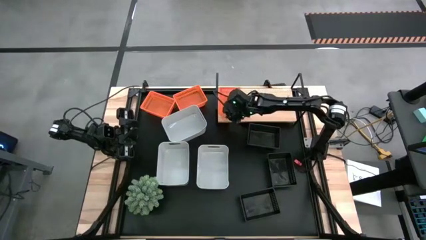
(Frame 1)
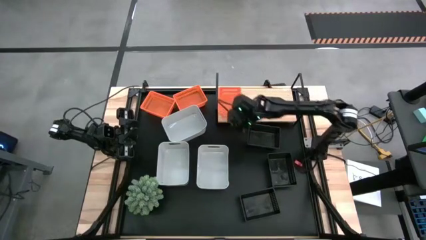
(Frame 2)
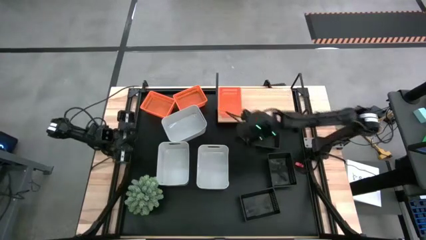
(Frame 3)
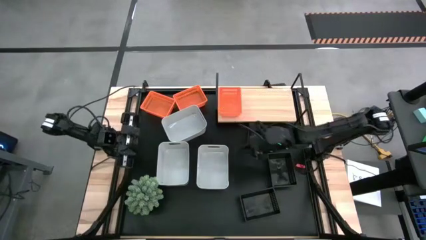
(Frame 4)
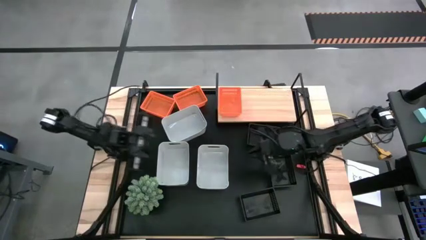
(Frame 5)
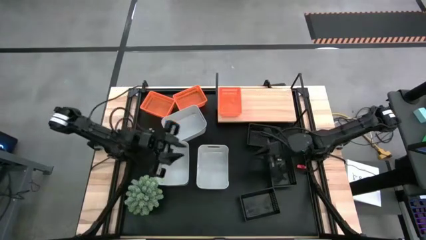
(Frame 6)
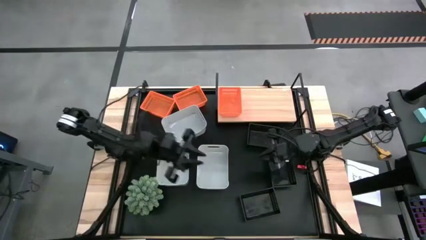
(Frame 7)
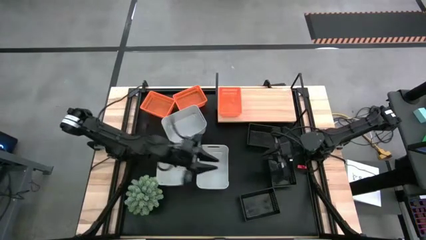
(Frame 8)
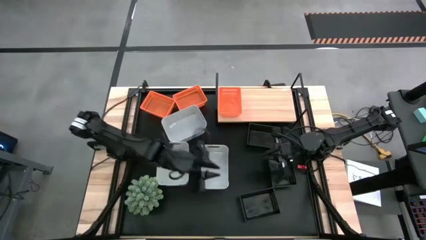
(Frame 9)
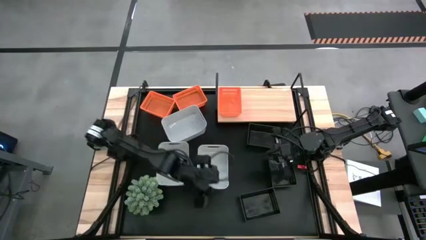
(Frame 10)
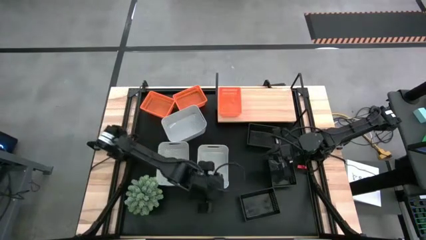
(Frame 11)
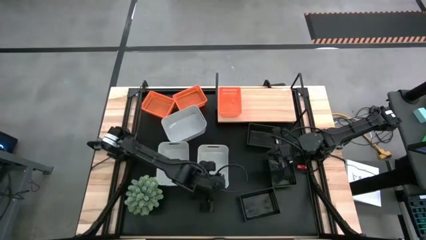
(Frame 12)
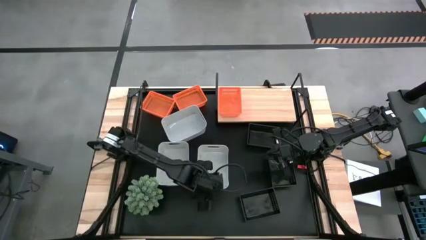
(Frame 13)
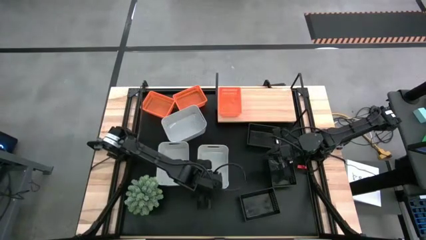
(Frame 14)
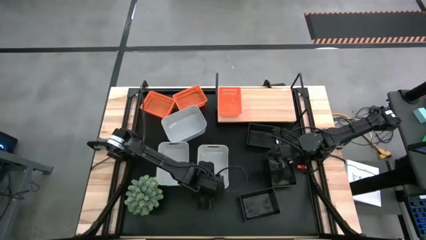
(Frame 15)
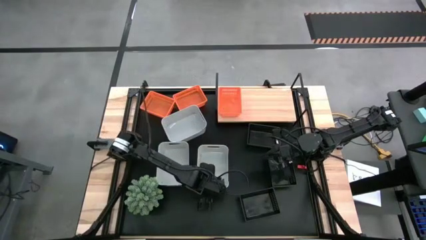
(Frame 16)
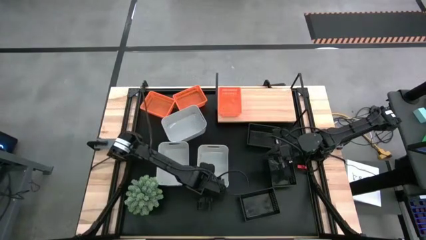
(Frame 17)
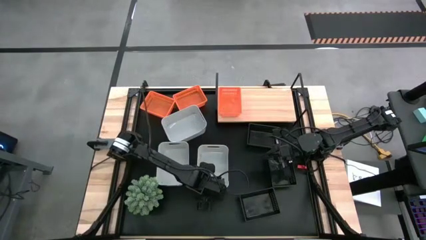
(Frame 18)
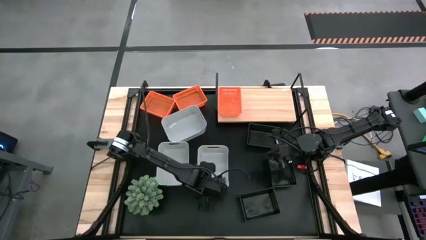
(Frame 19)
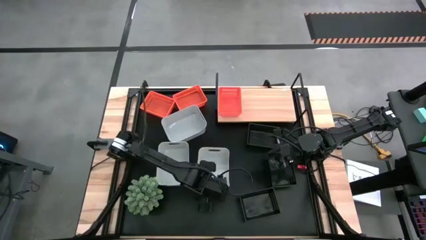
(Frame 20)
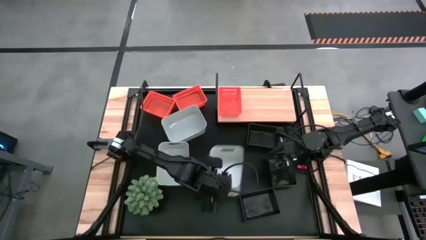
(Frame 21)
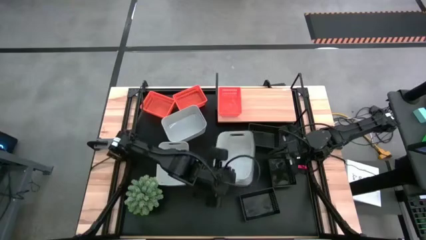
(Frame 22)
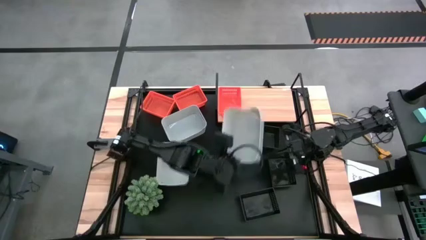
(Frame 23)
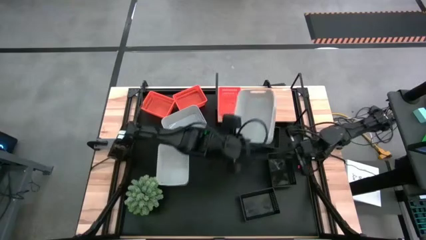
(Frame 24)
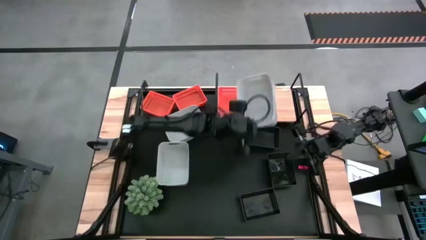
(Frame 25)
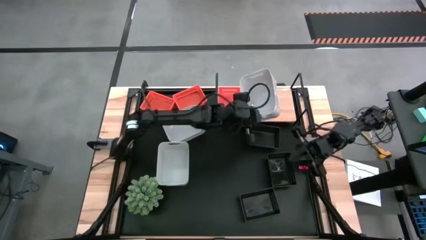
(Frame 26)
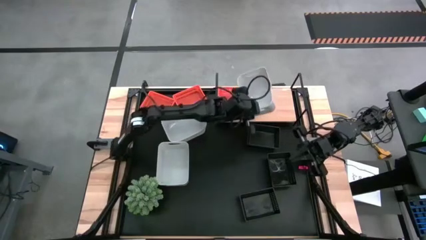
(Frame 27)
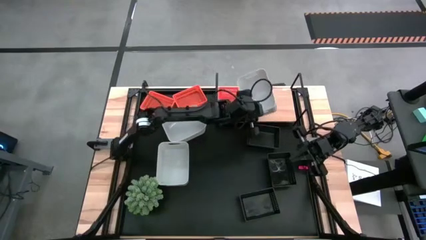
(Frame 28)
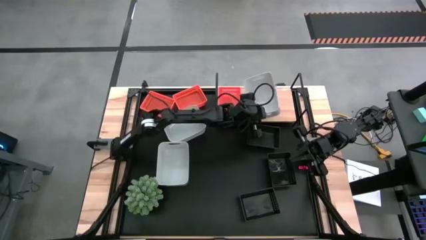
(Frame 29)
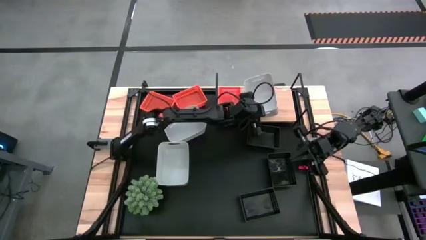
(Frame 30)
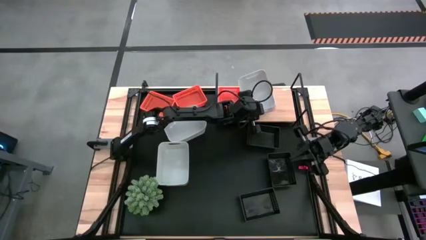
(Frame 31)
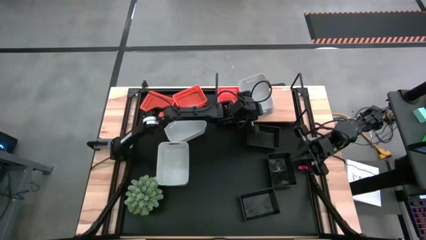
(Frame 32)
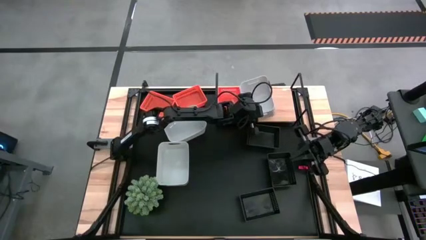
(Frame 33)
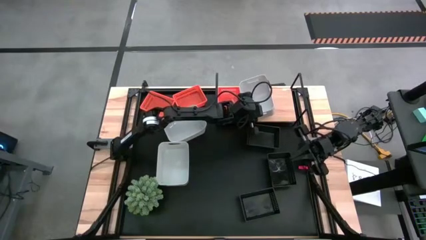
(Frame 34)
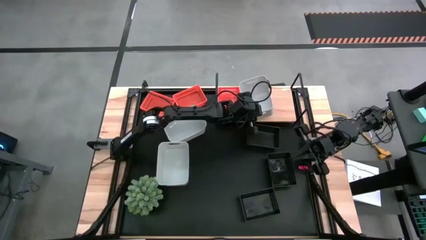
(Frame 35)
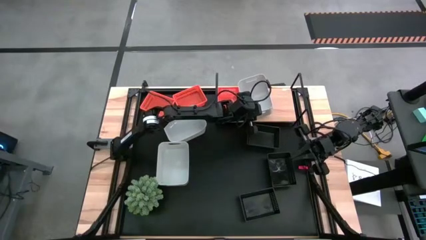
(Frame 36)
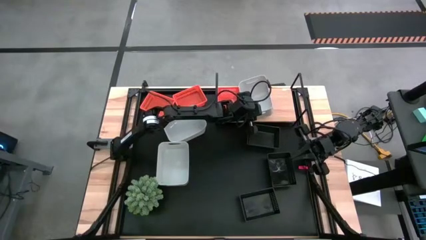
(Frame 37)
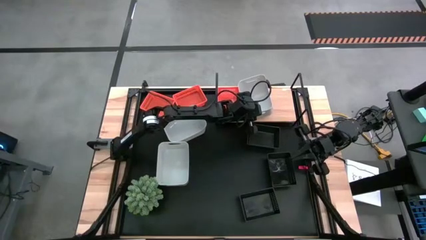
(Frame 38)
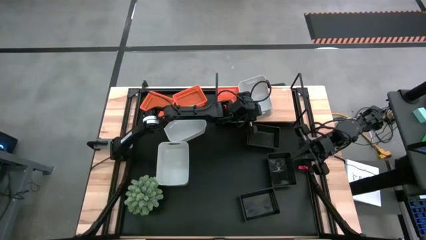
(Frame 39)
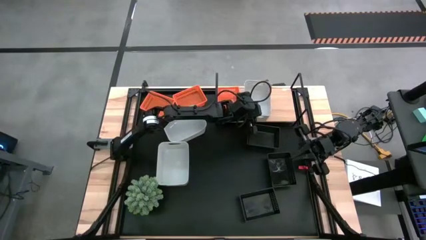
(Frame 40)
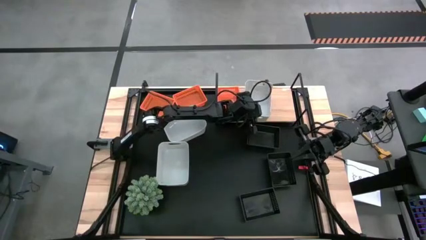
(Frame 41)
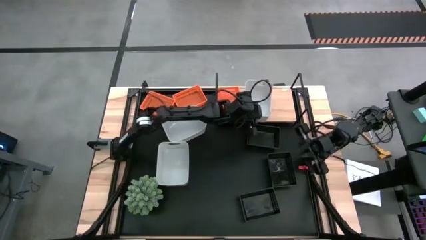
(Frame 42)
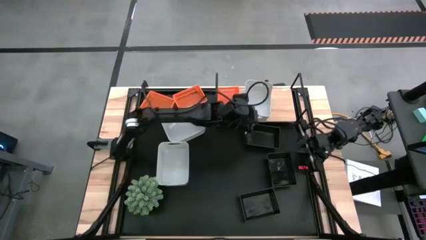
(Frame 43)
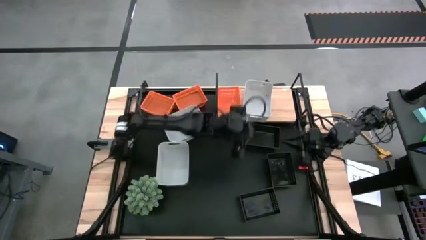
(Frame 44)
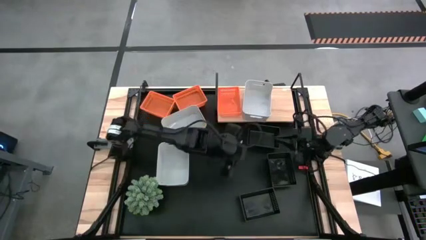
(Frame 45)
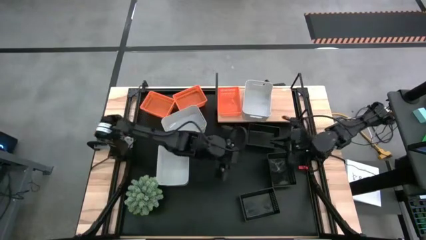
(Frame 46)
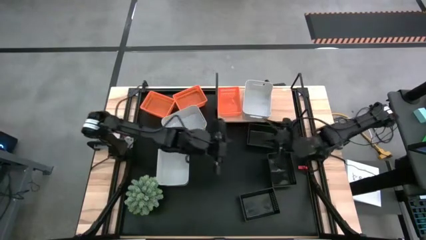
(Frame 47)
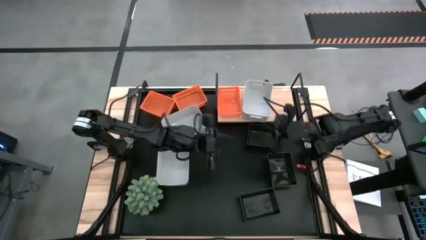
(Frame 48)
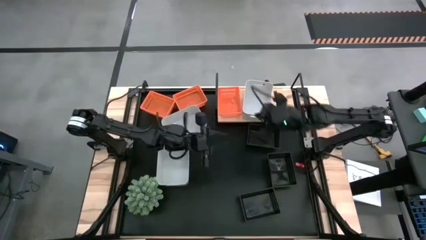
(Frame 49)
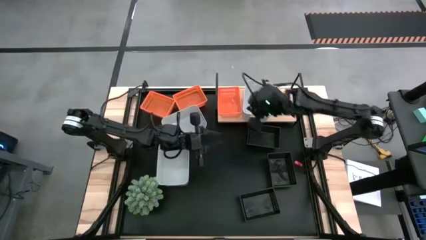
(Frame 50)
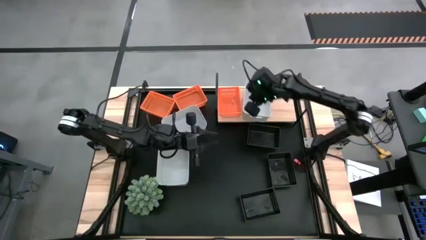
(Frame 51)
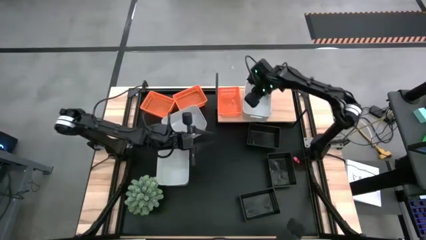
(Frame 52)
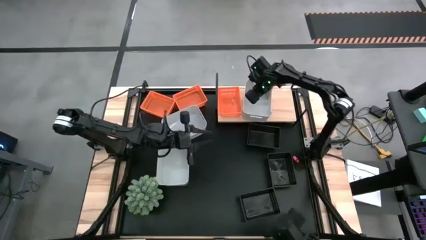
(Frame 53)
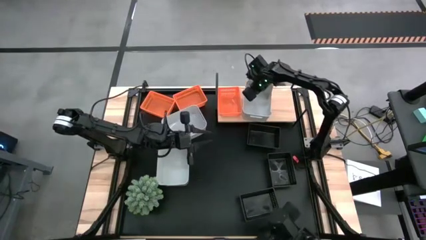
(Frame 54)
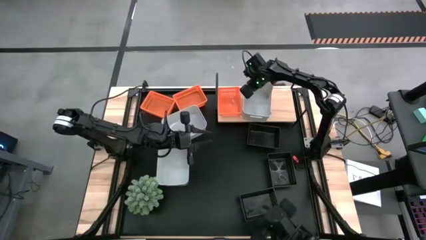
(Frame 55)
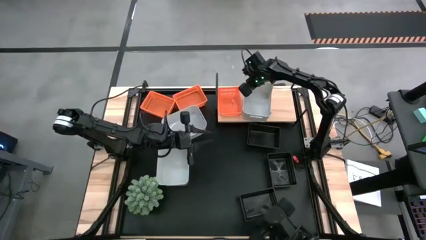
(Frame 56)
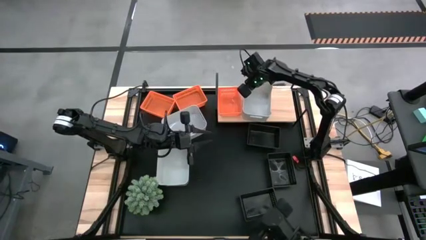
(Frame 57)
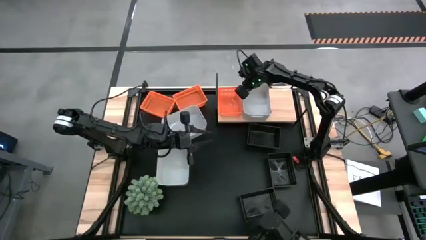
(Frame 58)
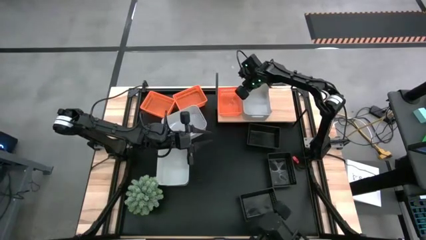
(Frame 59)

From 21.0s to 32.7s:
Task: Stack baskets on shelf by color
Put the bottom right white bin on the shelf
